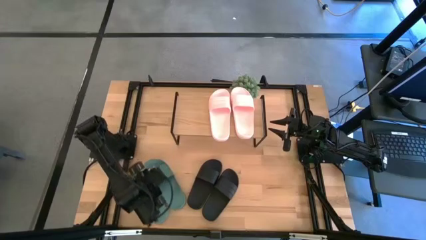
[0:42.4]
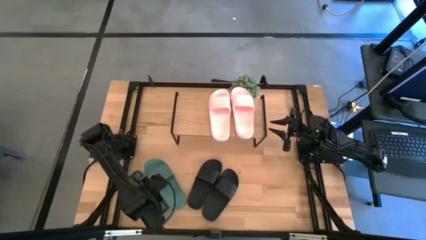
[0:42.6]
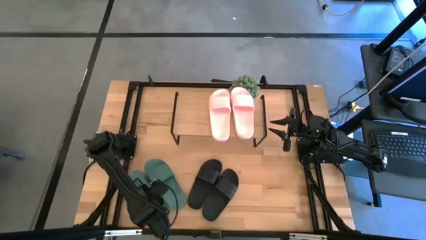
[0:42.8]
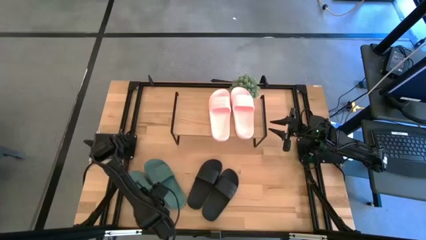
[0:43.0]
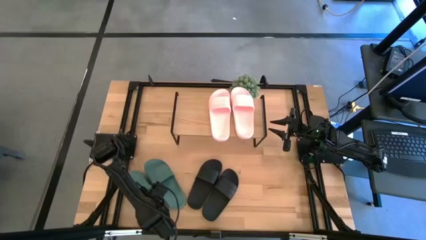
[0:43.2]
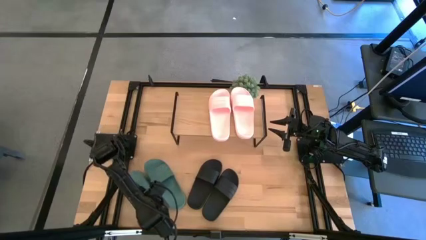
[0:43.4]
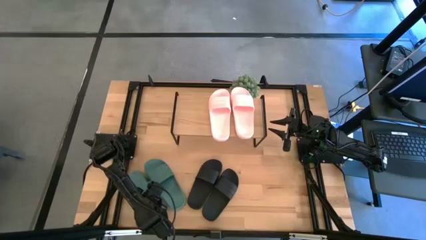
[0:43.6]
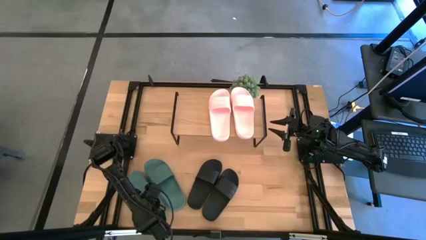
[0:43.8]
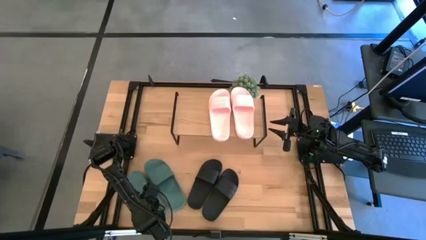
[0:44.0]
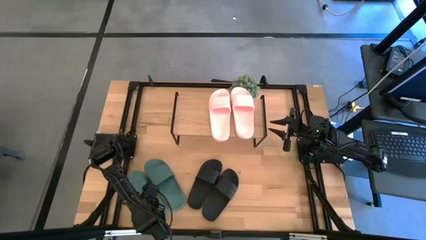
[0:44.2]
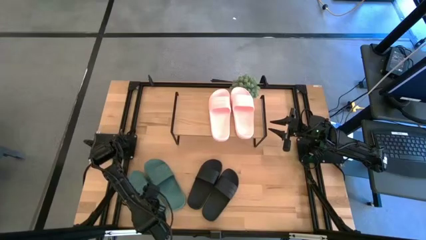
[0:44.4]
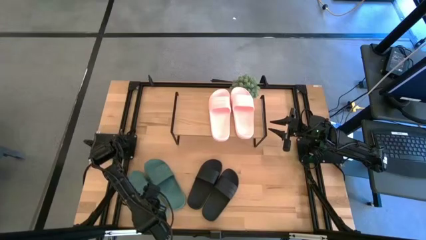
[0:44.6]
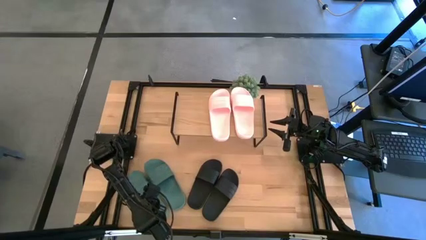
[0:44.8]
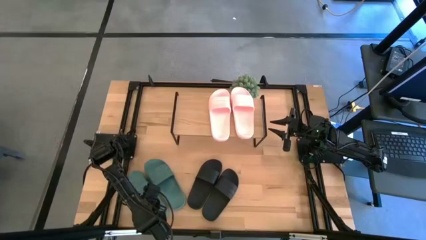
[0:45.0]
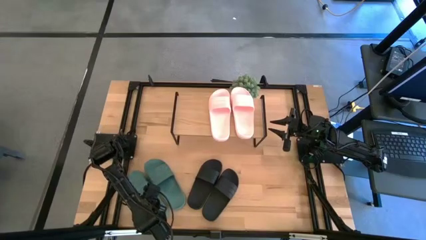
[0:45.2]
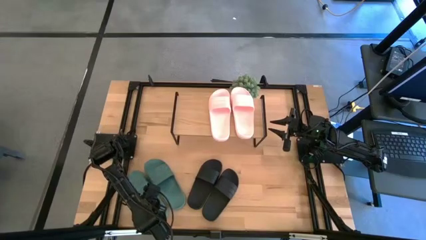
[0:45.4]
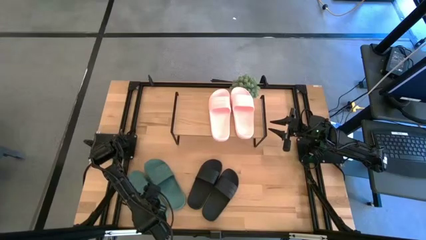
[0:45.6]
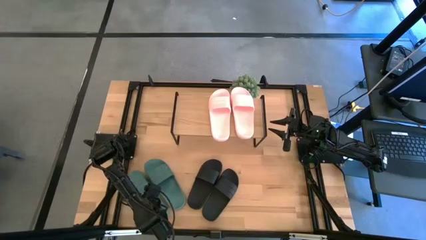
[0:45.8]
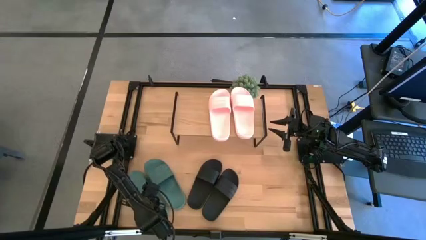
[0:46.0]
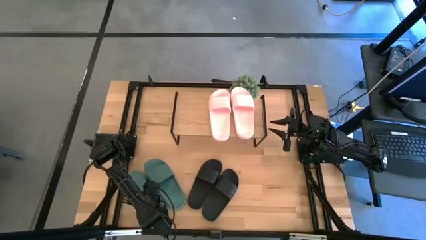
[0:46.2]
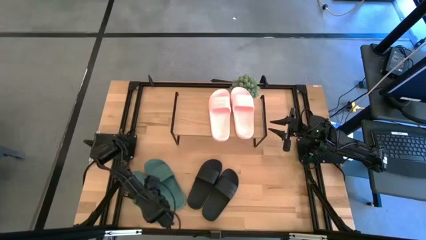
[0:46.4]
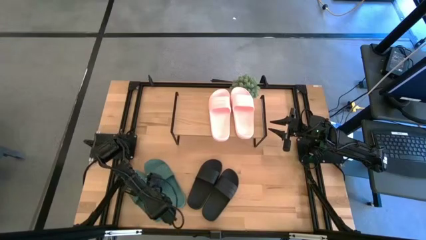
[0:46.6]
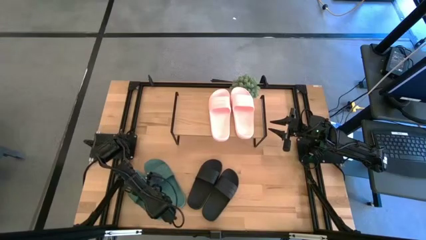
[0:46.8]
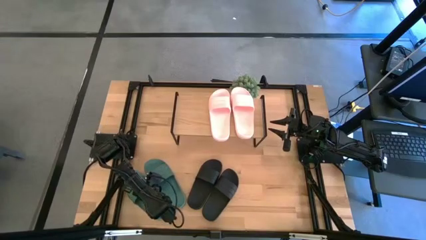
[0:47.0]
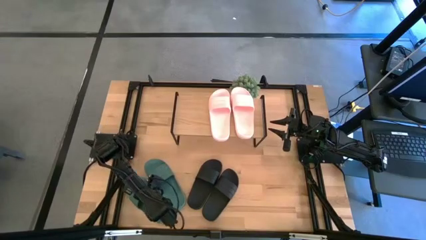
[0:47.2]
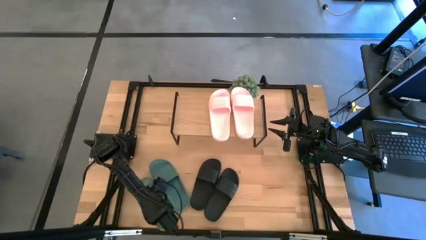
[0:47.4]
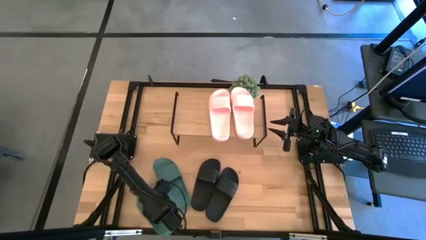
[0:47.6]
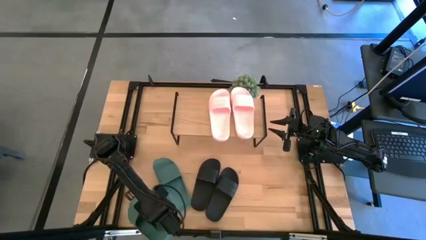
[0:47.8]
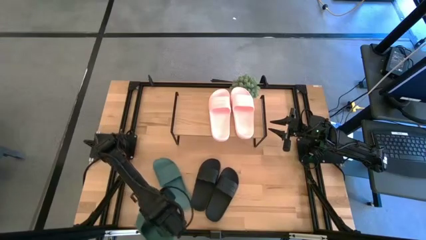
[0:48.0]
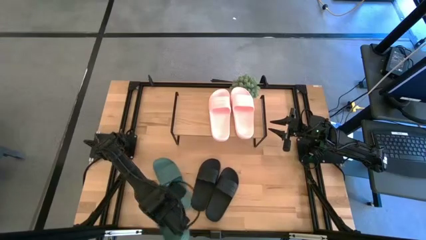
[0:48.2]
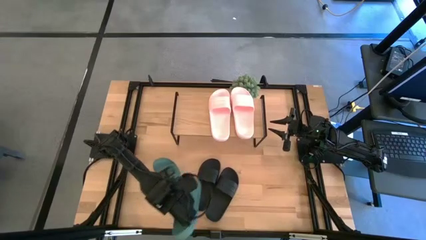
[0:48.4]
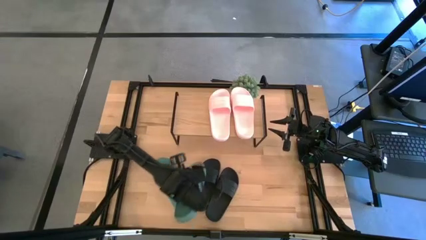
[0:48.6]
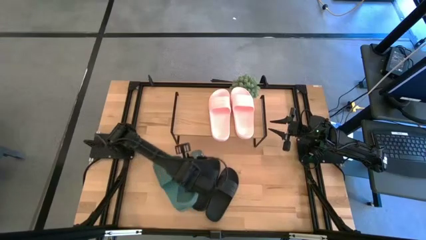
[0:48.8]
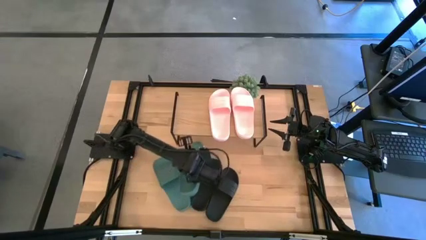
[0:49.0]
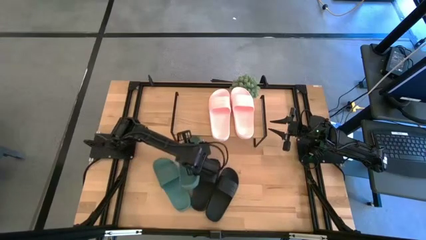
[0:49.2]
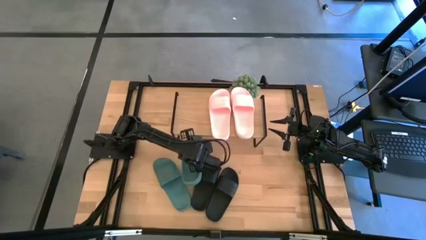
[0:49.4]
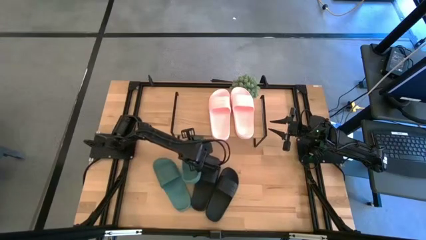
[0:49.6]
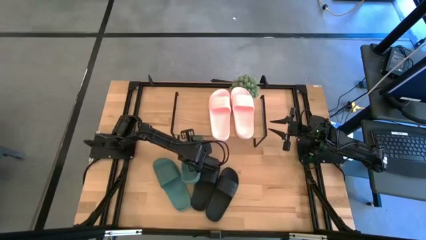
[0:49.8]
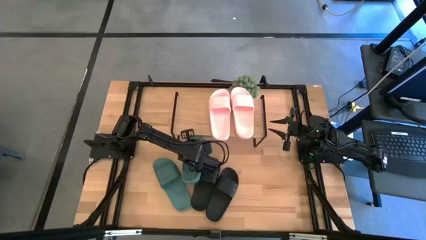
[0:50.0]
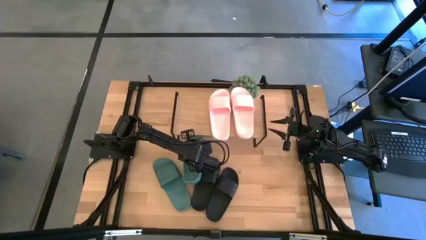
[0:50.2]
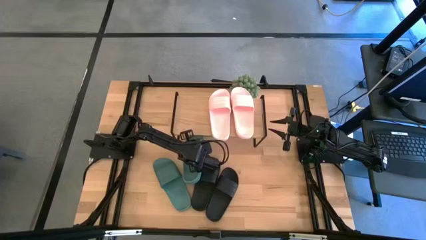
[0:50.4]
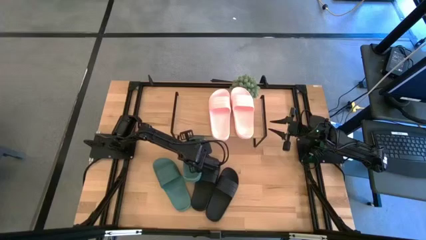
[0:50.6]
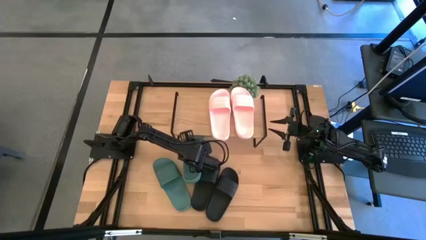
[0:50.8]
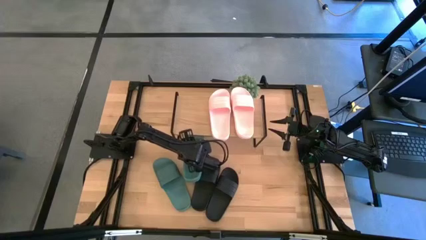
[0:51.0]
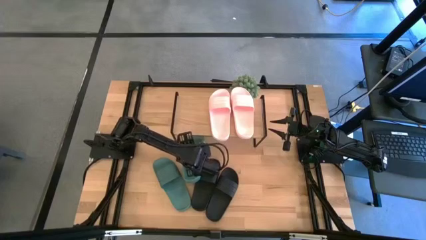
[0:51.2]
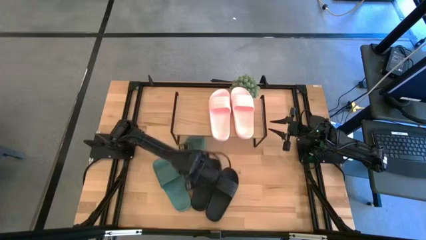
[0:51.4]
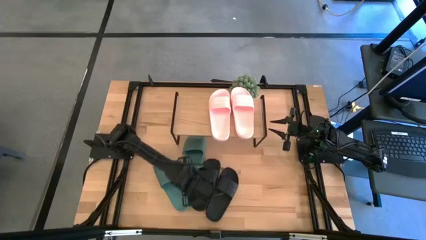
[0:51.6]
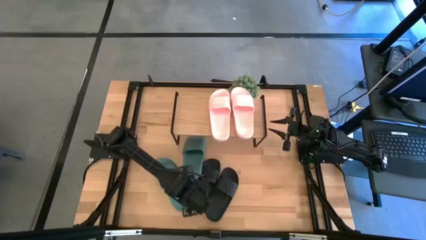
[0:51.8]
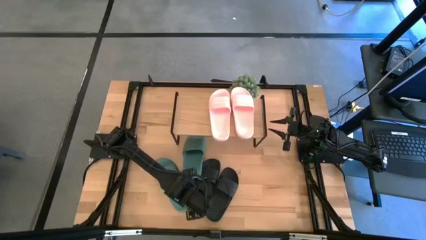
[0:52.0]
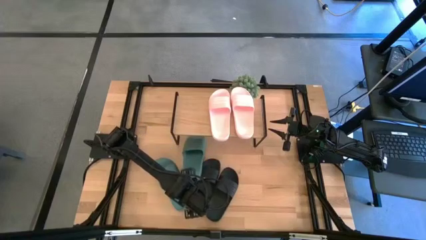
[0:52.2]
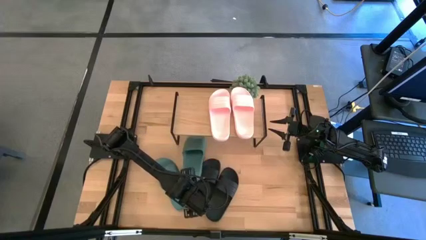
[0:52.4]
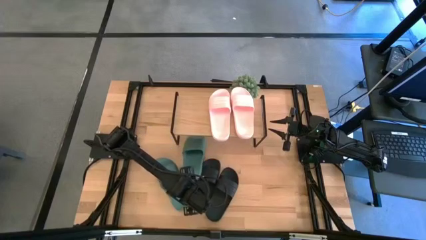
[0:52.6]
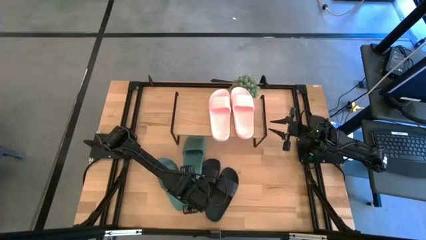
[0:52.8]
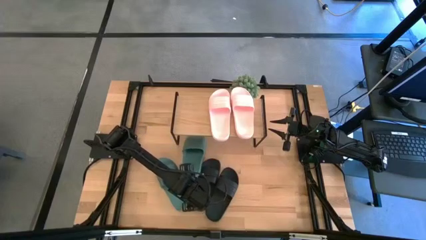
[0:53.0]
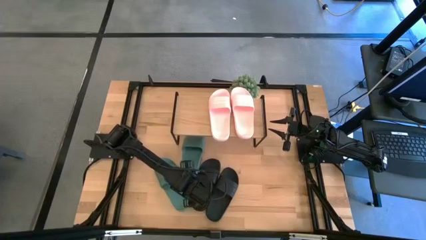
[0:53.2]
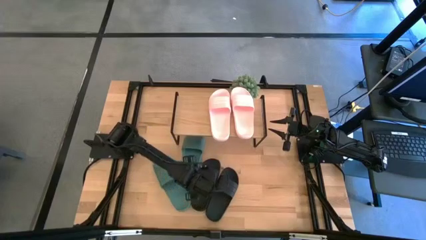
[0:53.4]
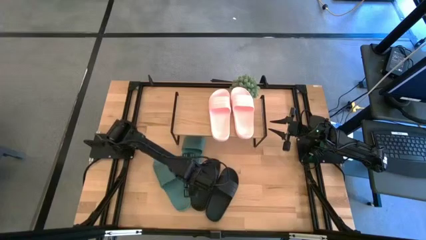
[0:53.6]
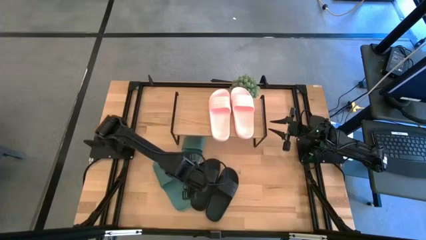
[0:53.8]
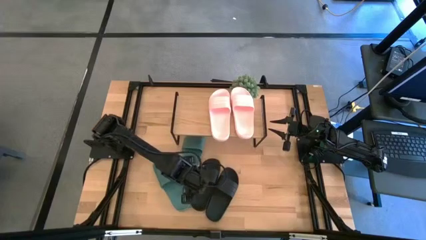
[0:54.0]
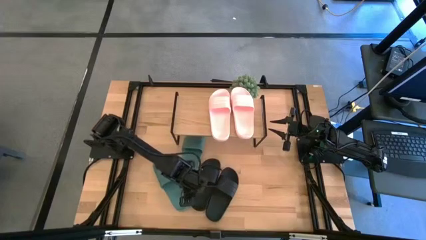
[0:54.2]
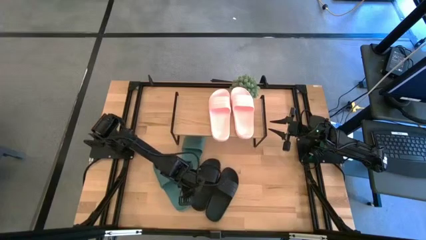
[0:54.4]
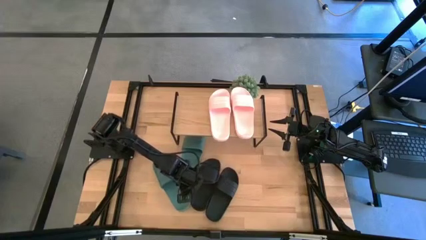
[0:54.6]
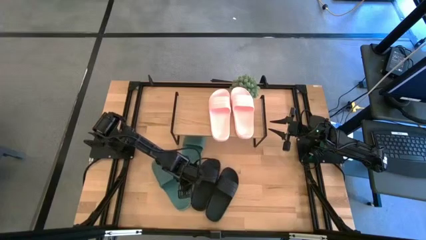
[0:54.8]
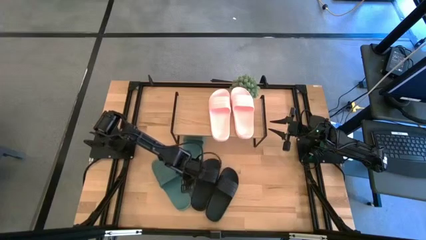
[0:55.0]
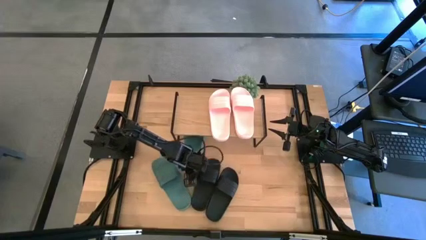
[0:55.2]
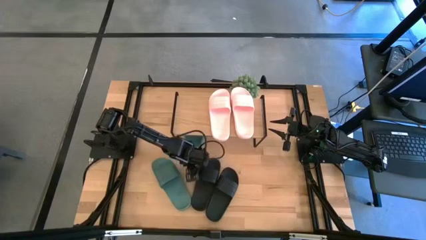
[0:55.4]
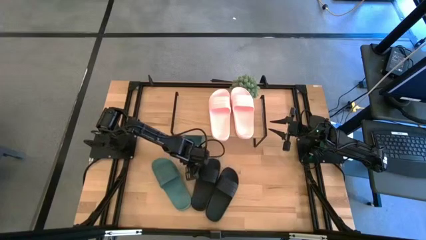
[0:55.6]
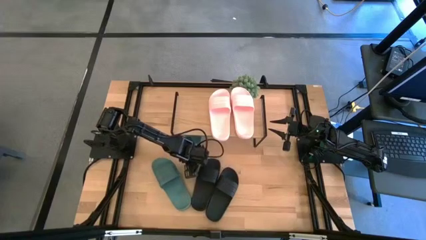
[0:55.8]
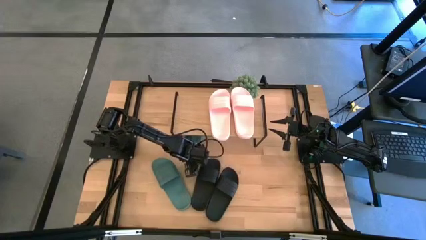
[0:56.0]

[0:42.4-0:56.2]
Task: Pick and place slides into the shelf
Put the left green slide under the shelf
